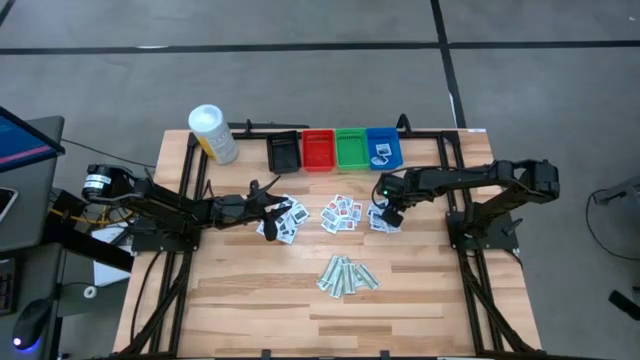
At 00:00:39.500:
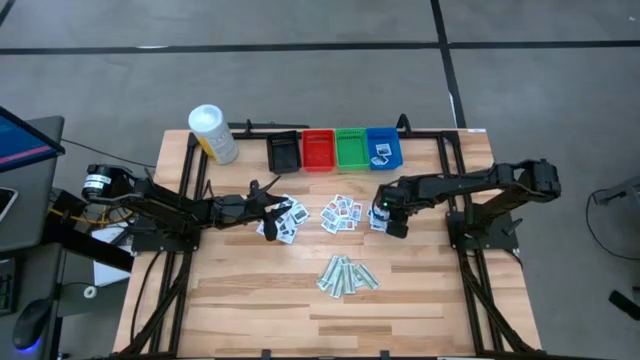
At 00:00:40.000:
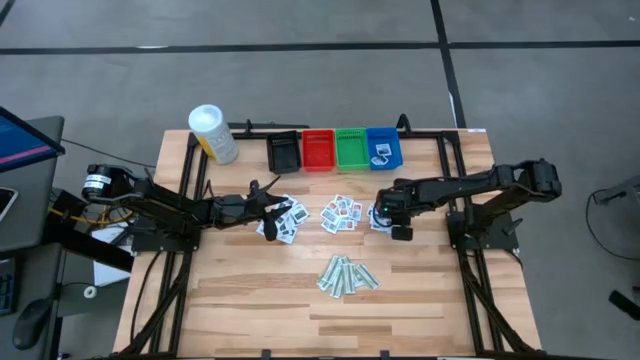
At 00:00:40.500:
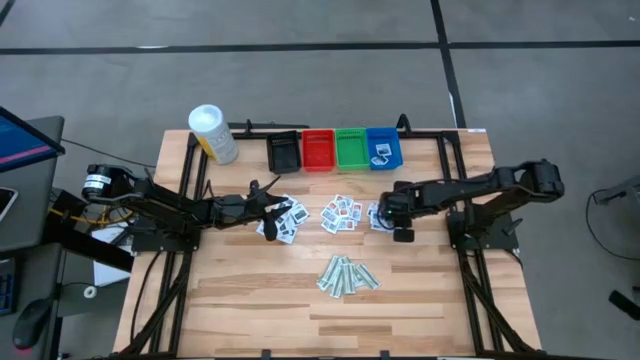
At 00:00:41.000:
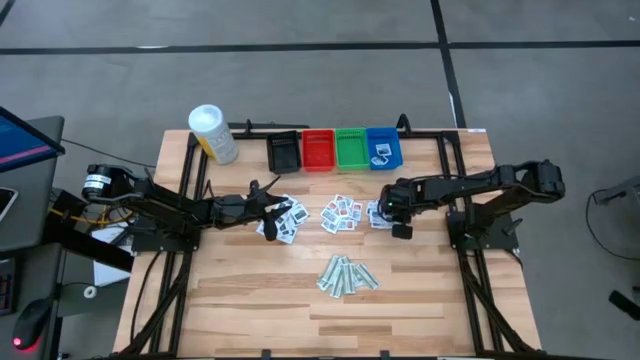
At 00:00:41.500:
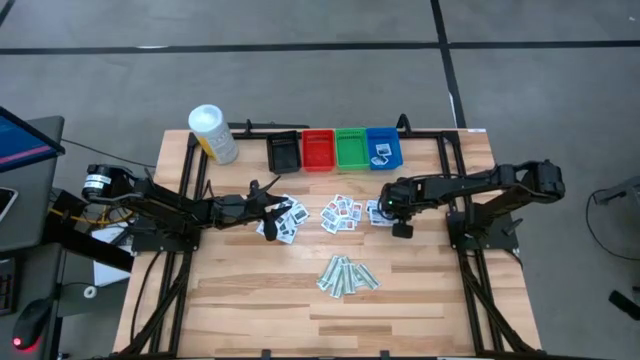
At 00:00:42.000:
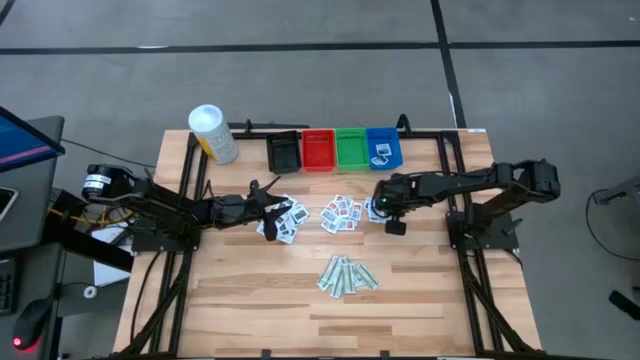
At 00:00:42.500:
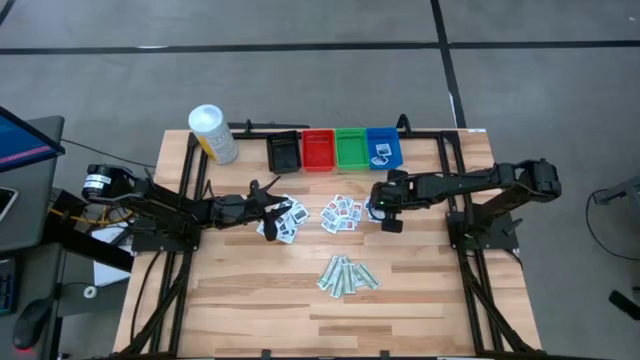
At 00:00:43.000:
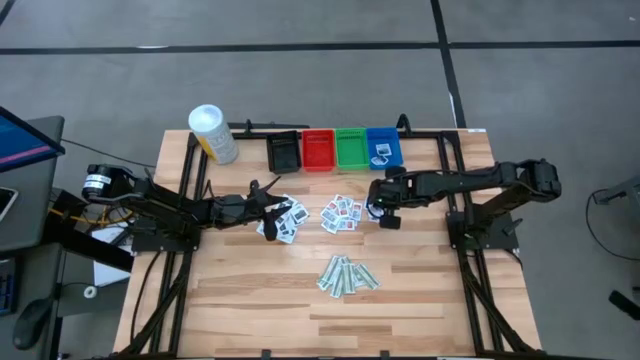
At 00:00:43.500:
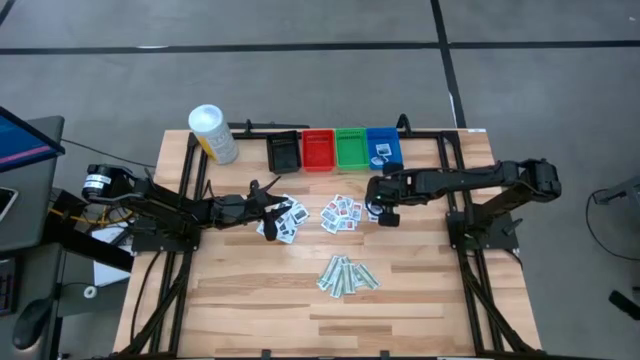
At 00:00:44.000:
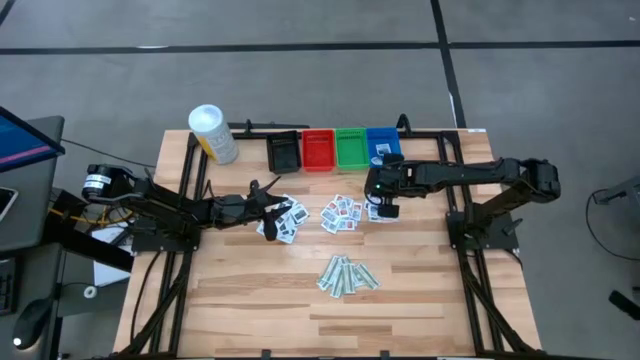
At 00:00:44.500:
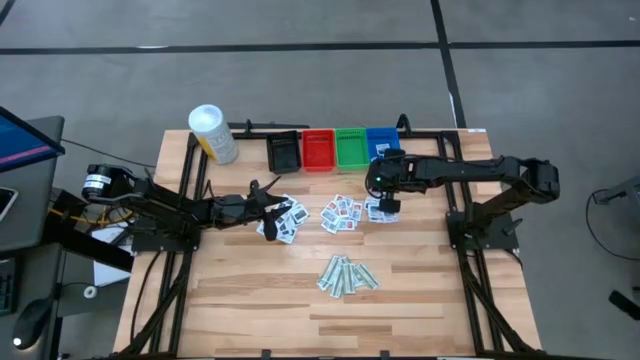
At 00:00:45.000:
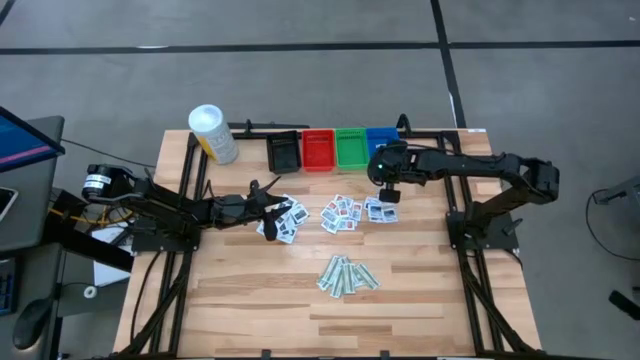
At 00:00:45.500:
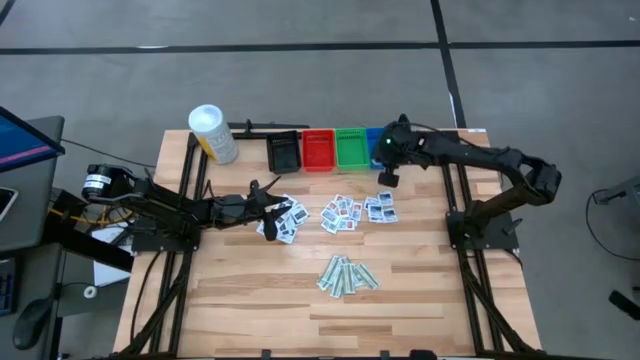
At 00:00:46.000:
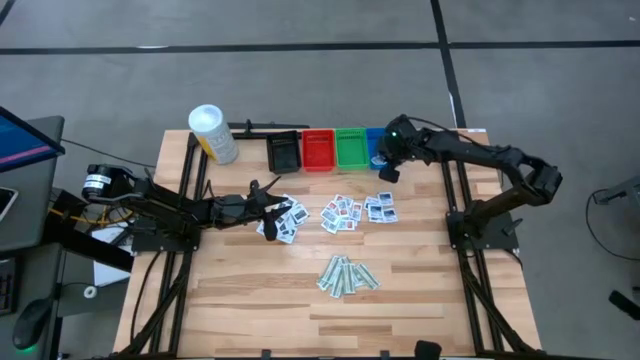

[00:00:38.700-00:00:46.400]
Task: Pick & Place First Aid Supplies
Put the blue alcohol pad into the blue bin

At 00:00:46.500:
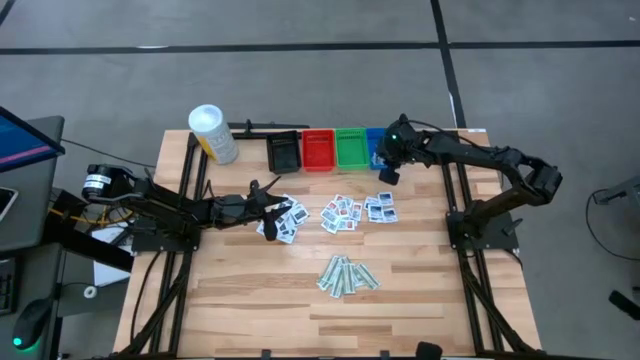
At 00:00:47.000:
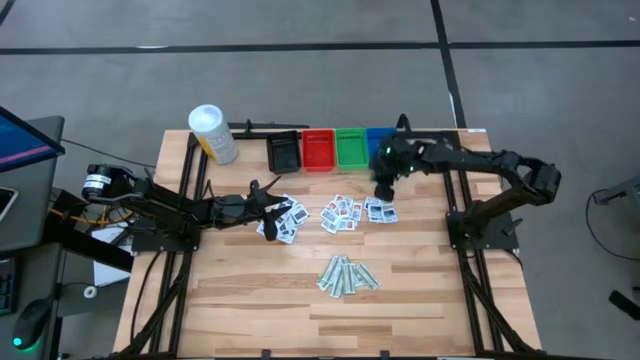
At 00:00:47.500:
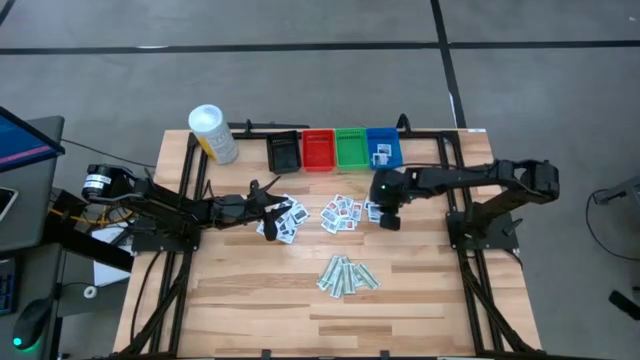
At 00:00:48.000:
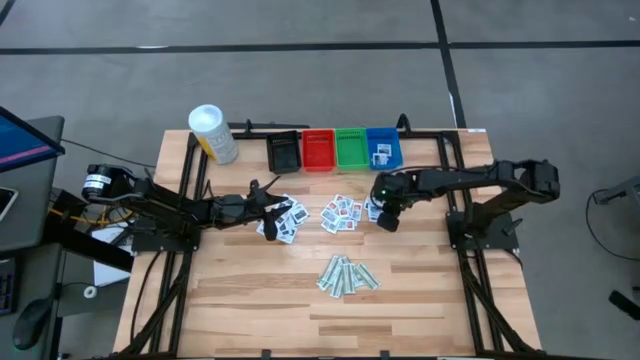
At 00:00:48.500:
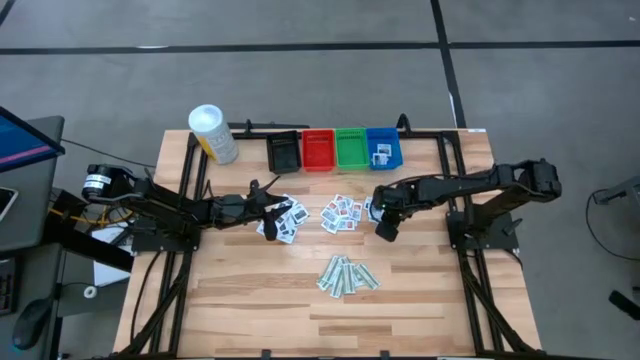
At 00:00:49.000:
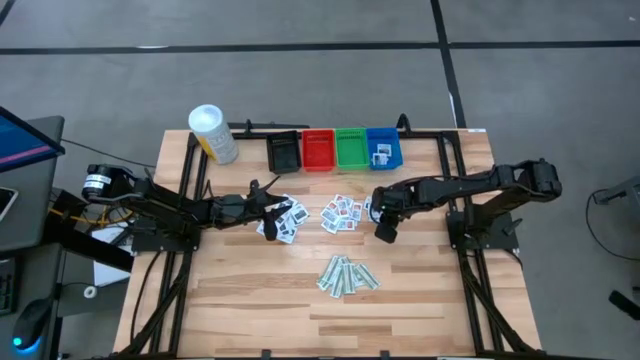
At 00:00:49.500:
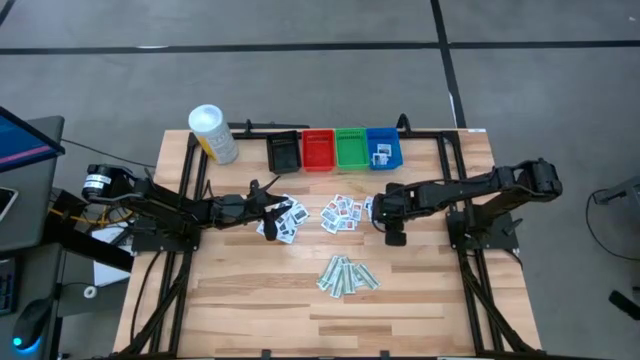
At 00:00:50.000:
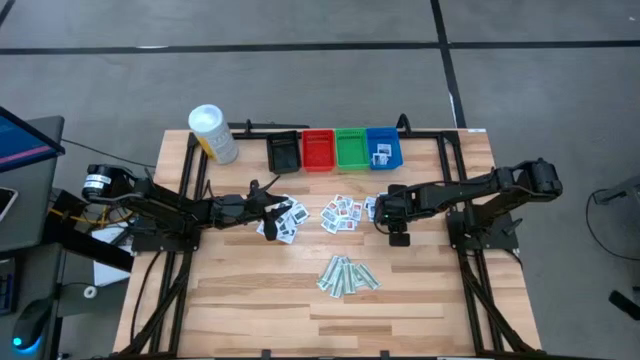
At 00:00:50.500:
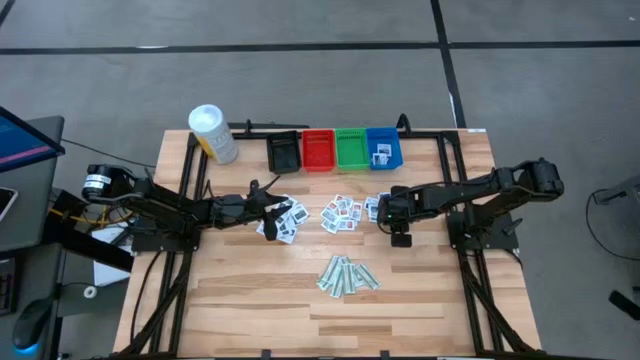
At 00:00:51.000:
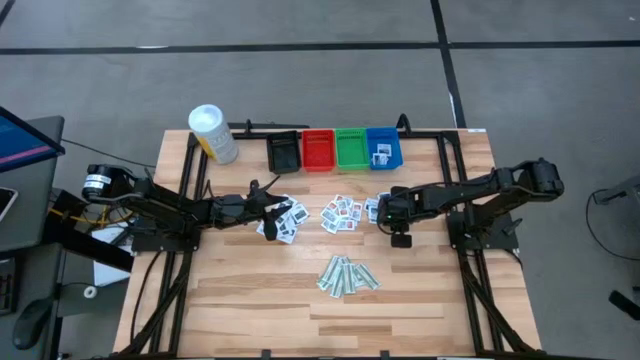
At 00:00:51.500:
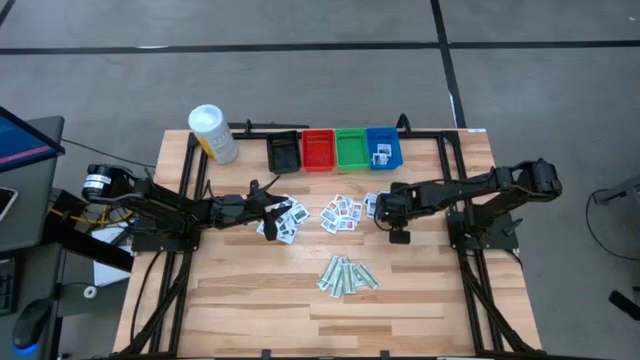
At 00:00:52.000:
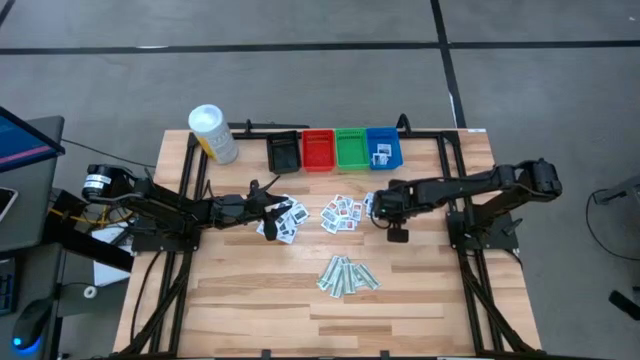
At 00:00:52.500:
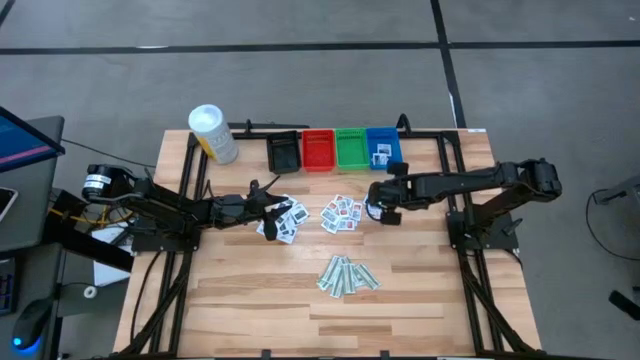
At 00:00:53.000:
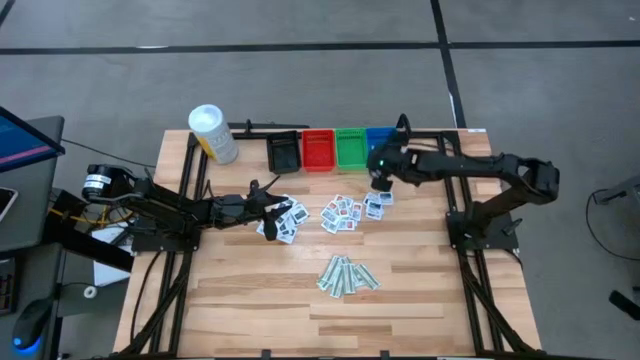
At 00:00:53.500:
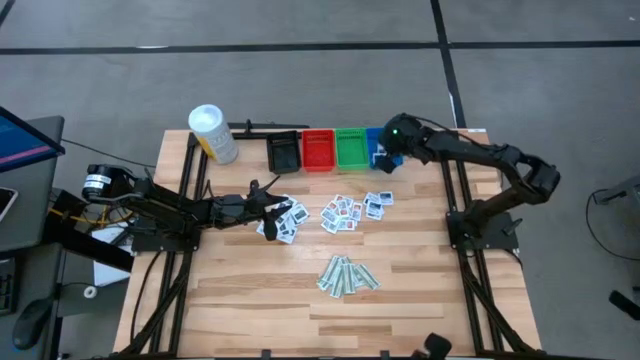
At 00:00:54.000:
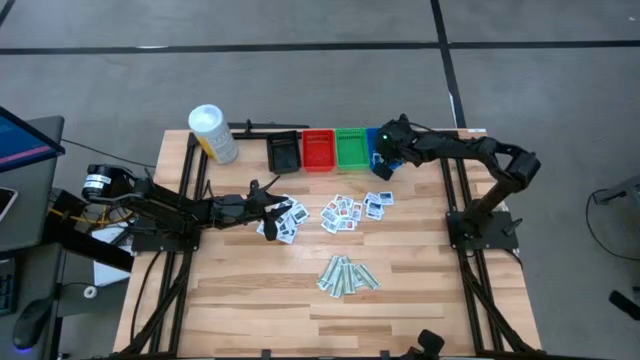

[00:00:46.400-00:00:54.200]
Put the blue alcohol pad into the blue bin

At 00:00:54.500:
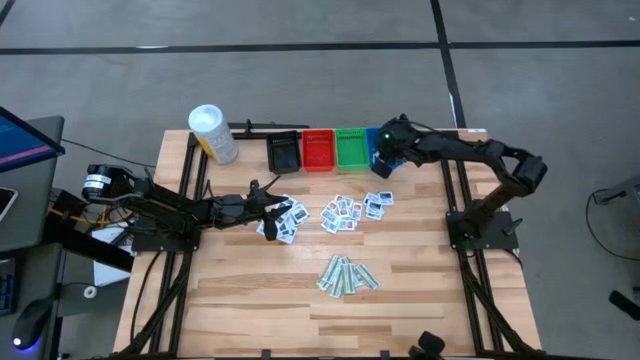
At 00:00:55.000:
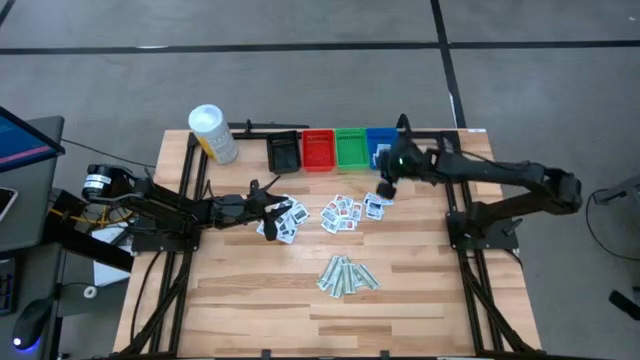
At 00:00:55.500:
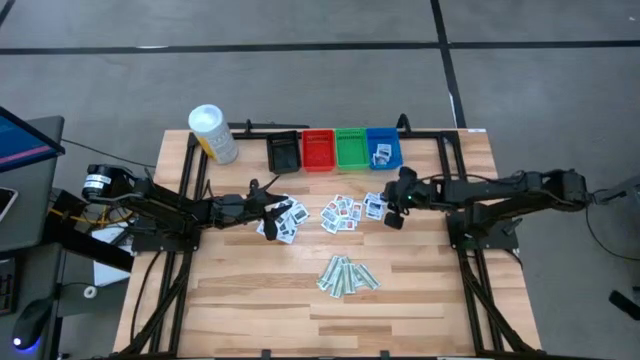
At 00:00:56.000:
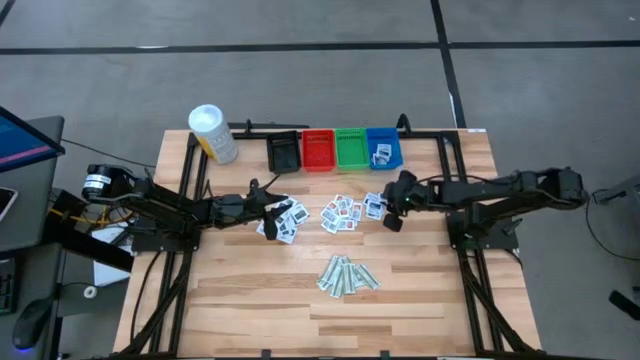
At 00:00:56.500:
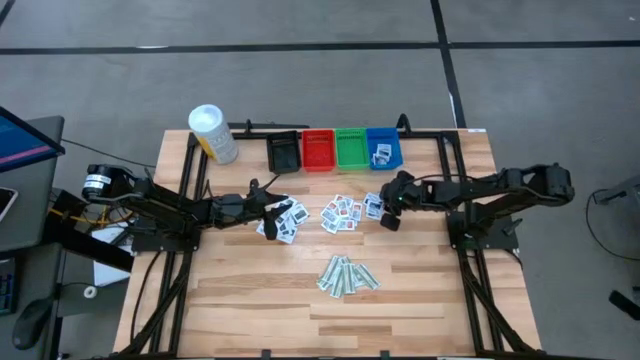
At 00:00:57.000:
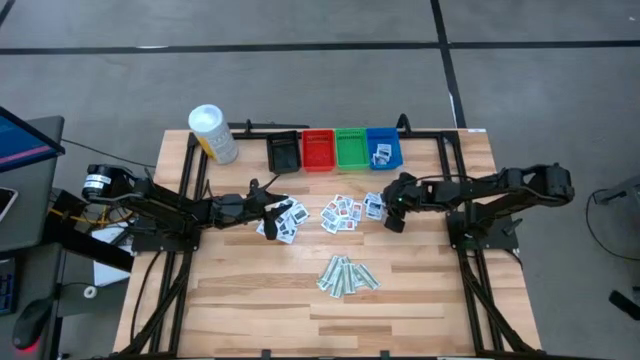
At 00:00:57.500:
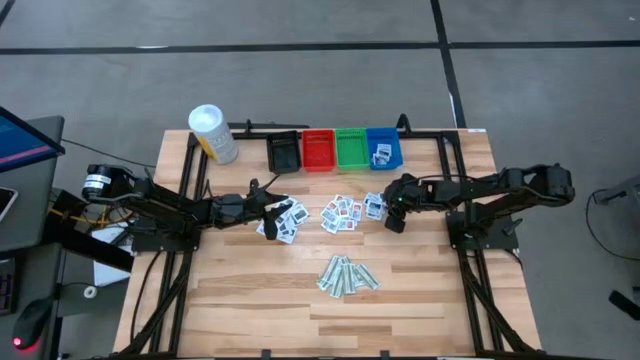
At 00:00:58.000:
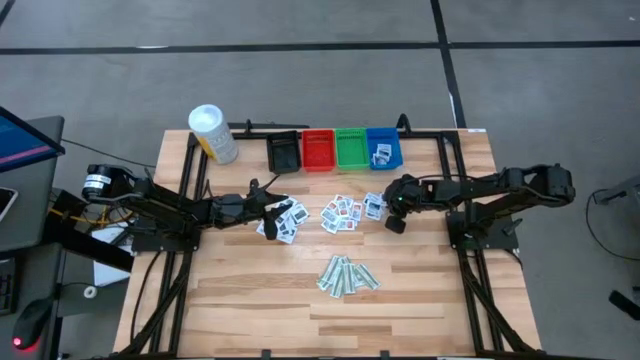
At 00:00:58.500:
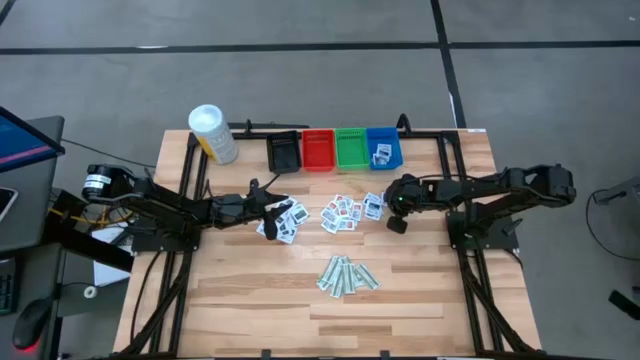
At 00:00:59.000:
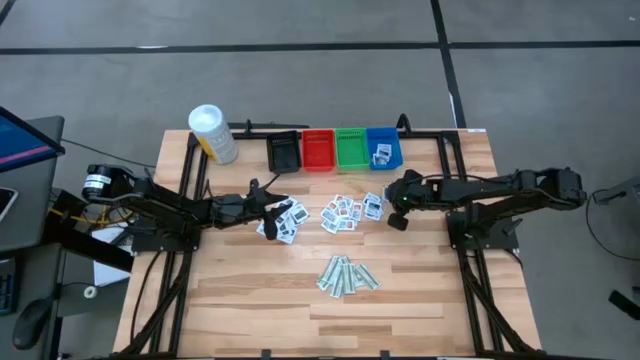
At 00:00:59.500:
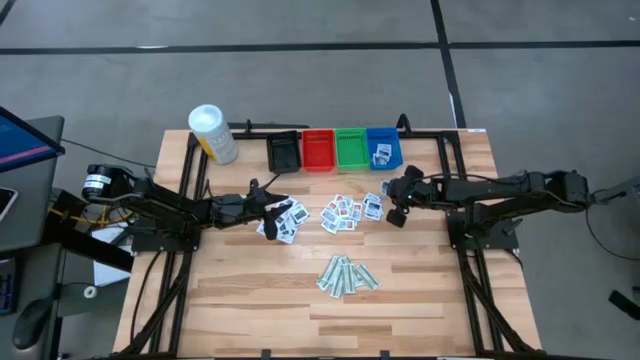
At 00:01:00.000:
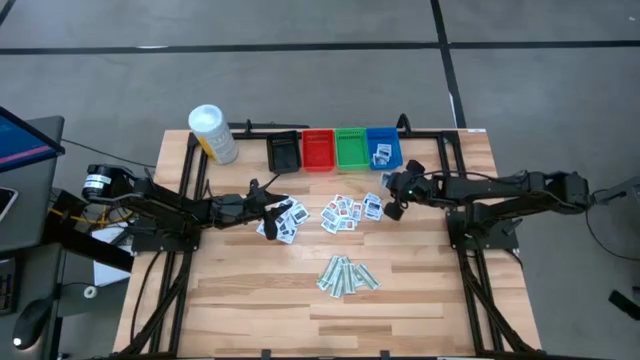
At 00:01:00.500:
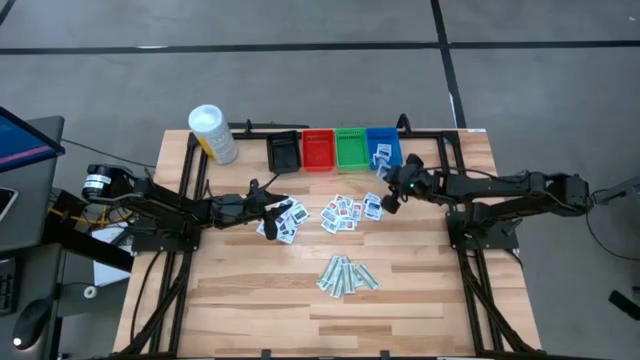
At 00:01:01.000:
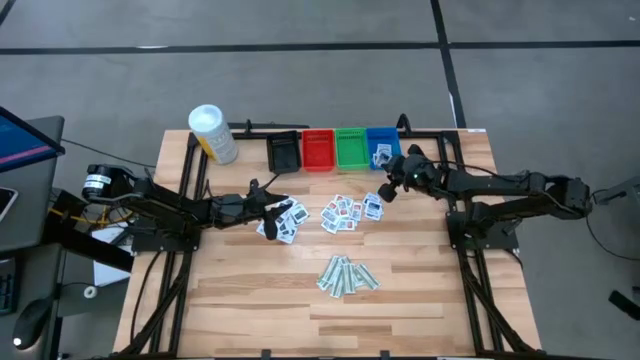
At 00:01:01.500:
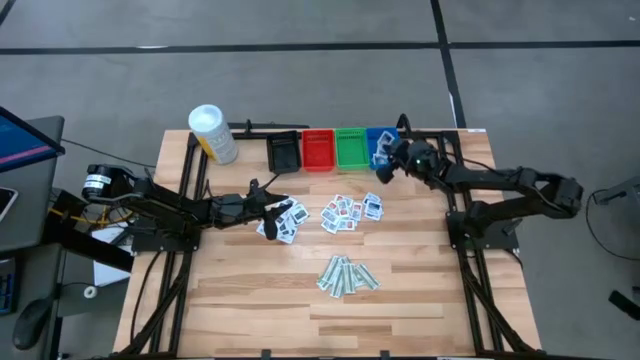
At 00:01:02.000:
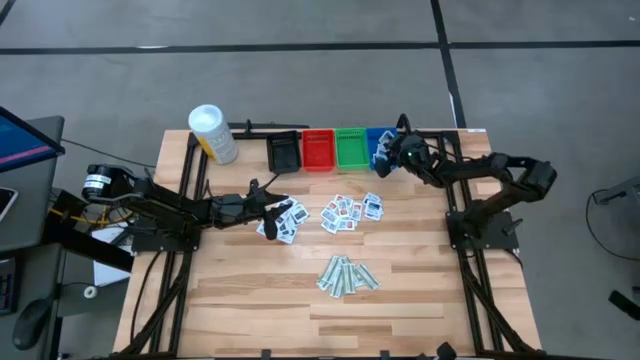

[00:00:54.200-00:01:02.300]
Put the blue alcohol pad into the blue bin
